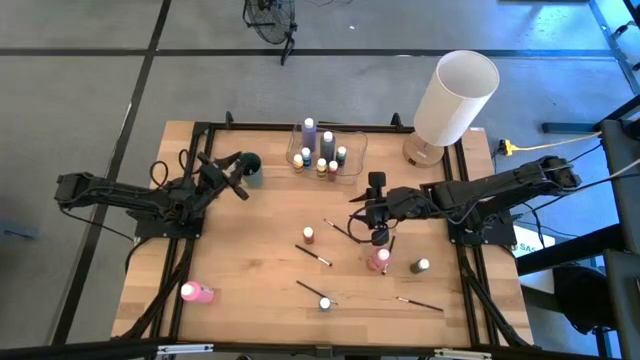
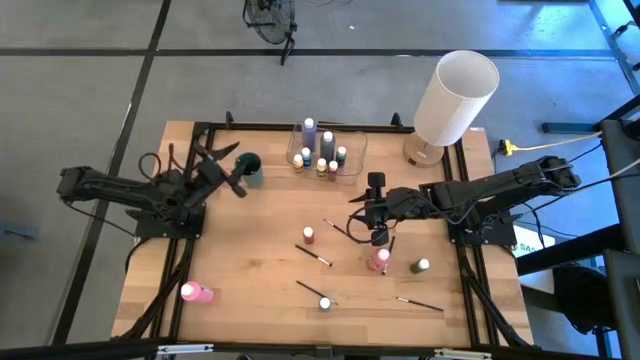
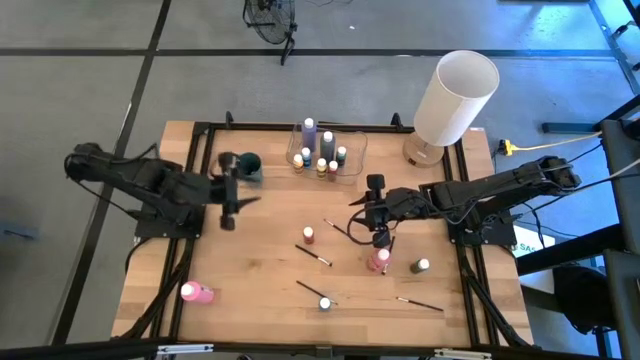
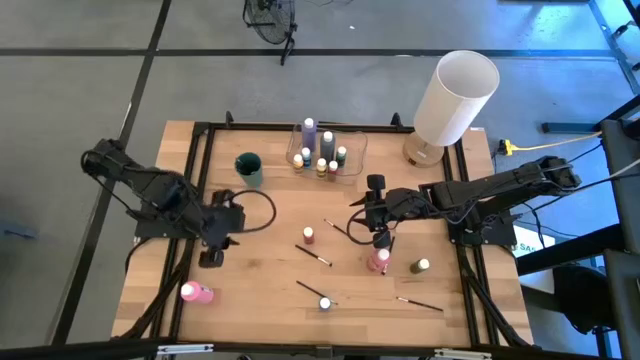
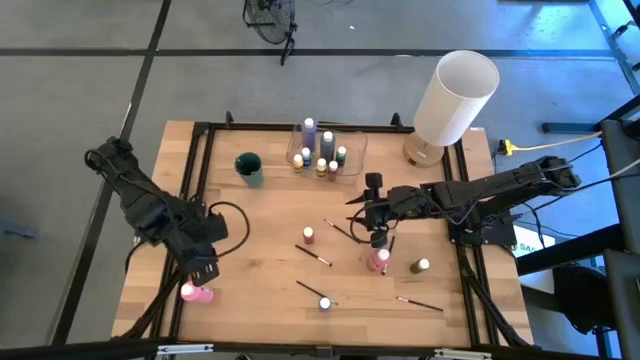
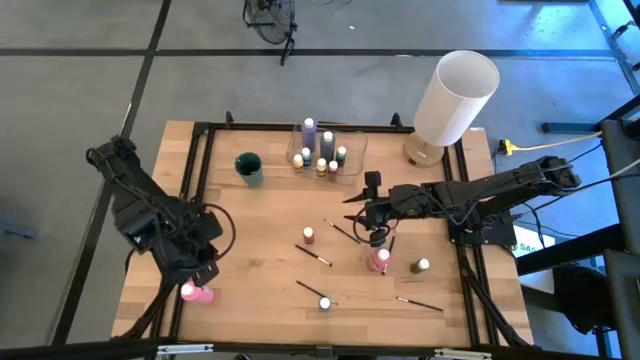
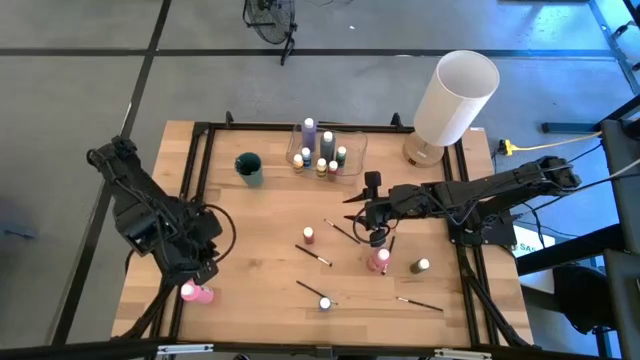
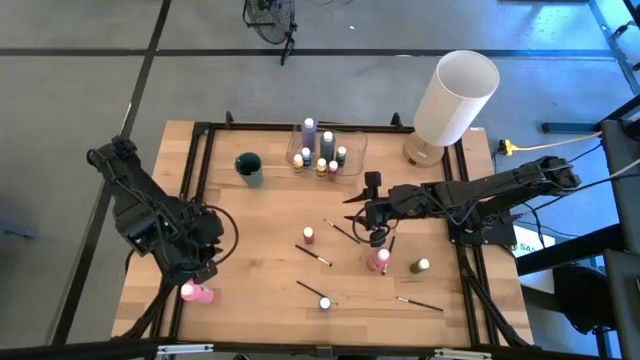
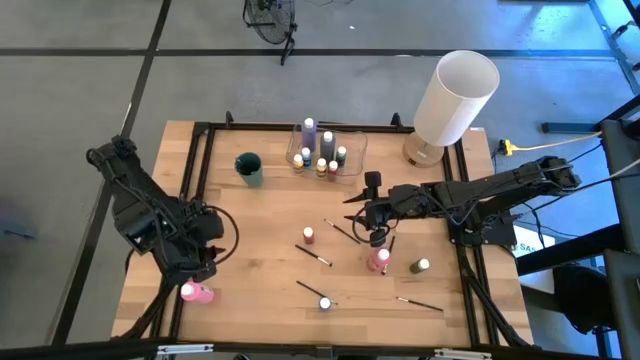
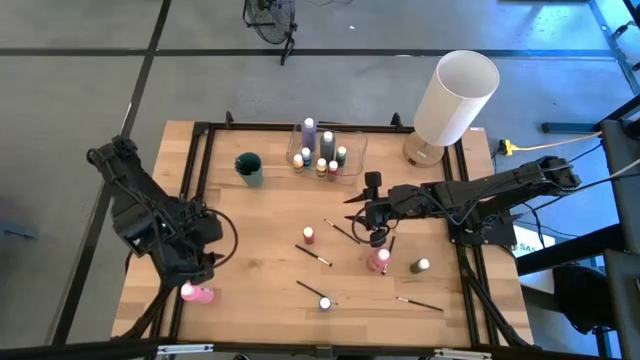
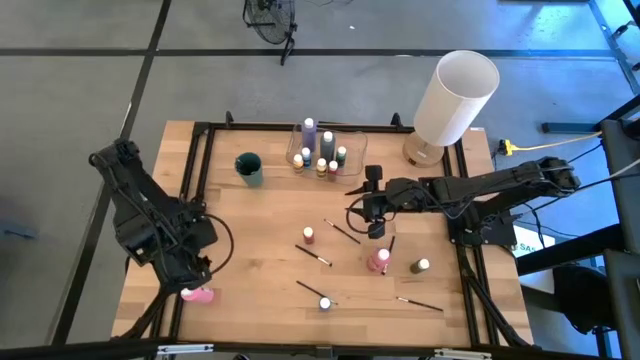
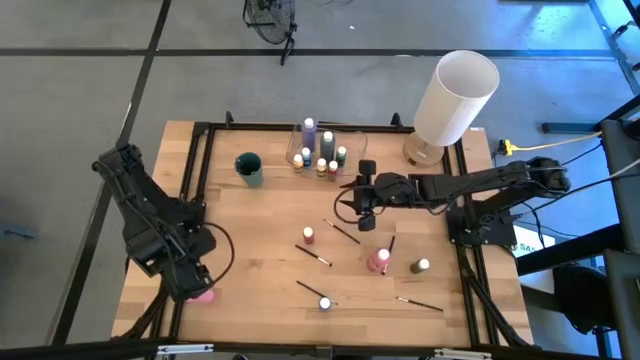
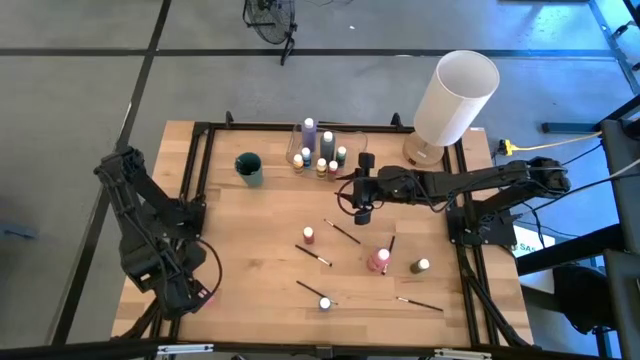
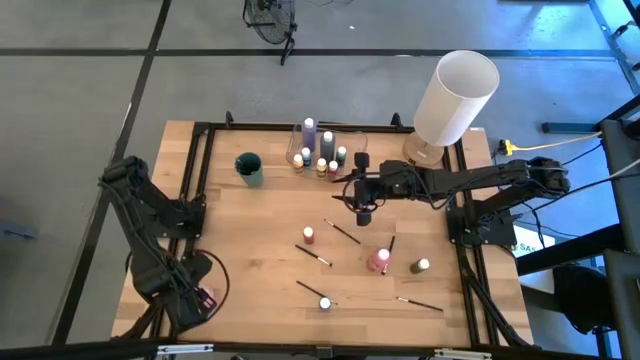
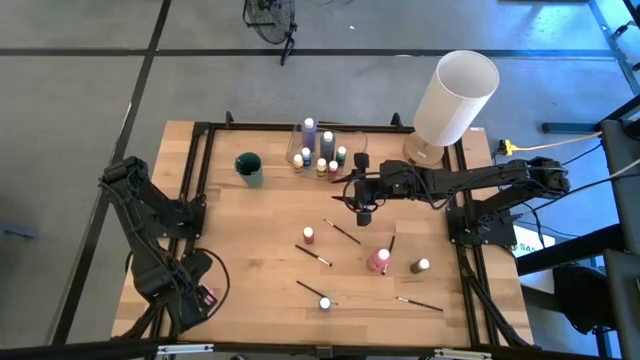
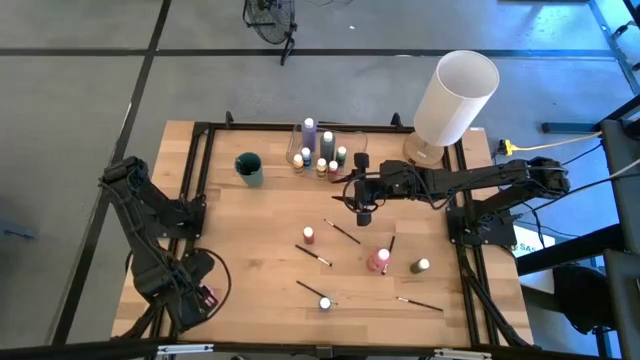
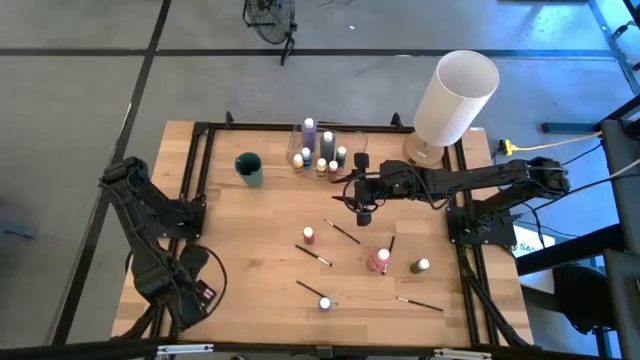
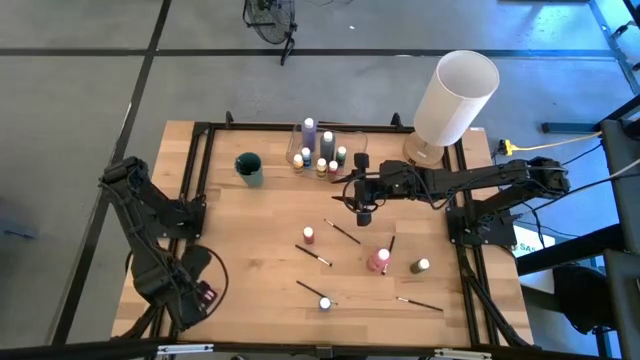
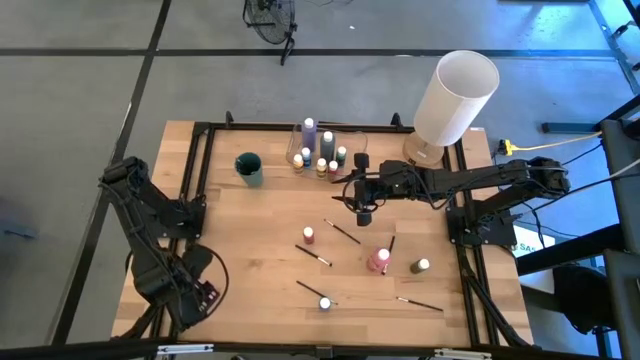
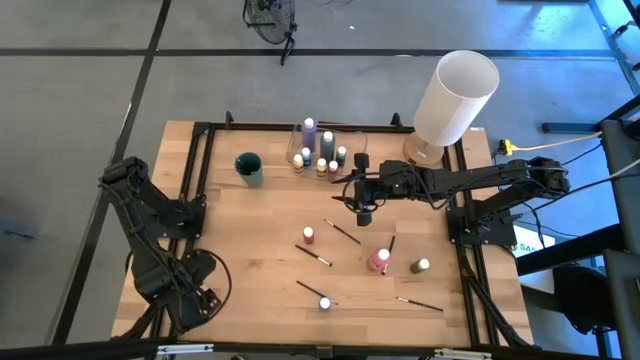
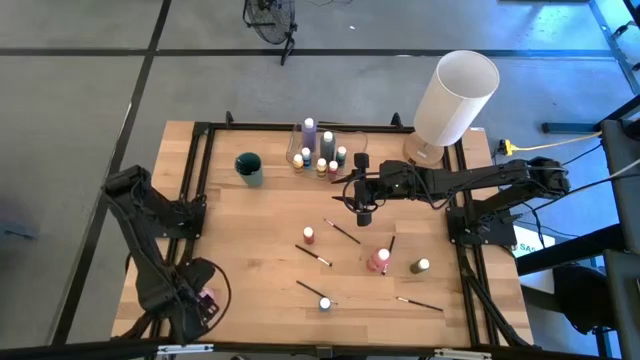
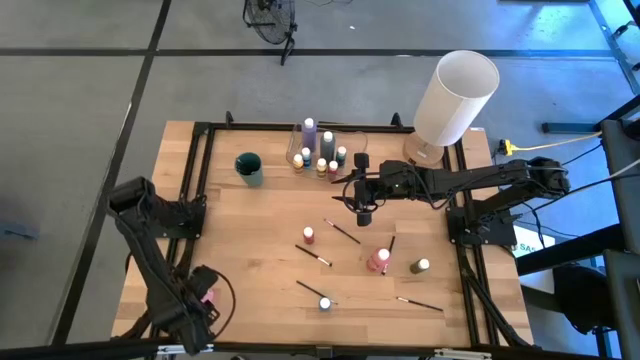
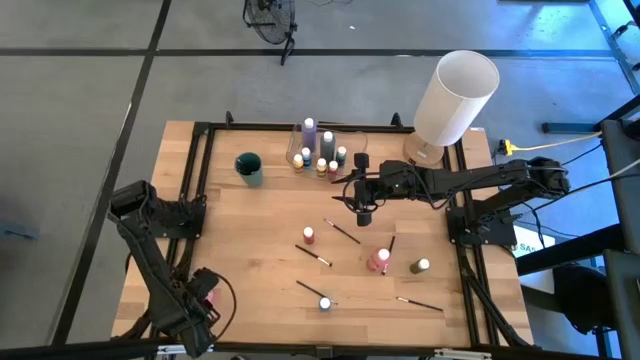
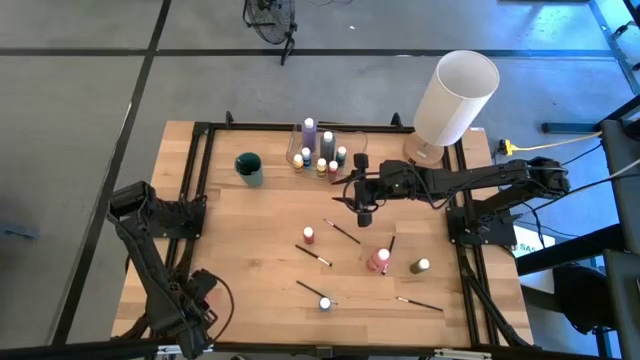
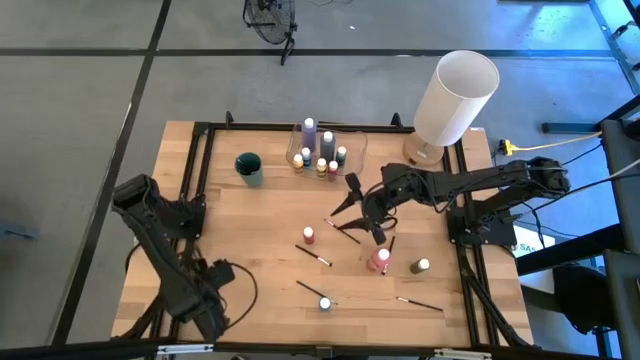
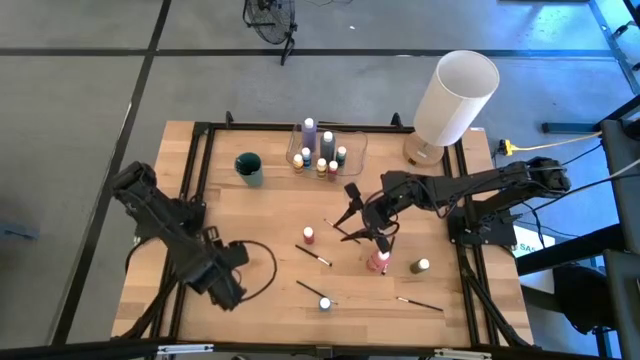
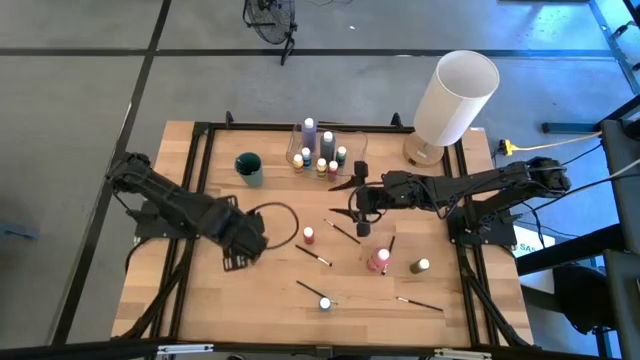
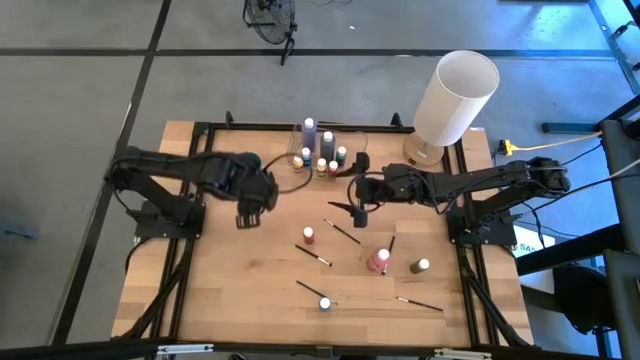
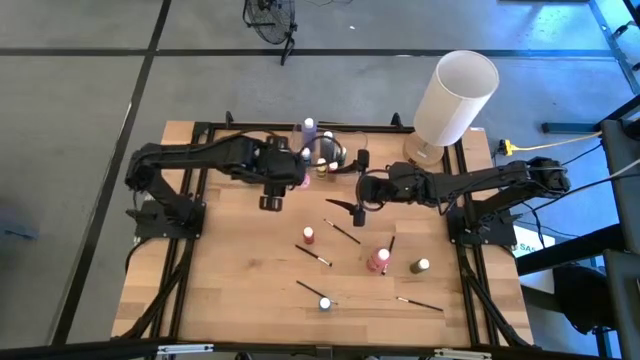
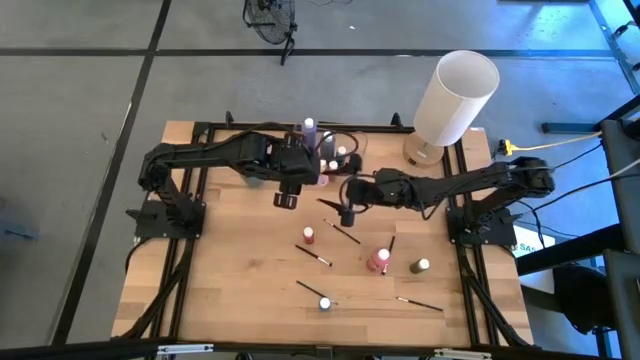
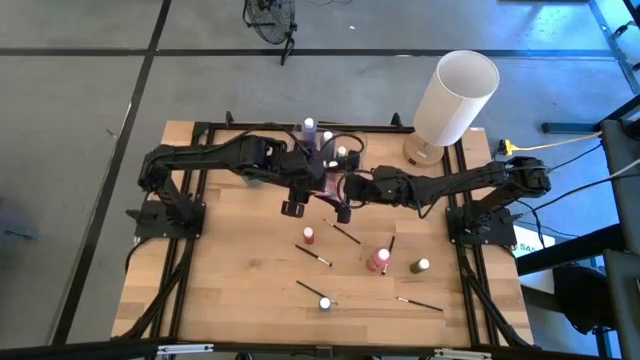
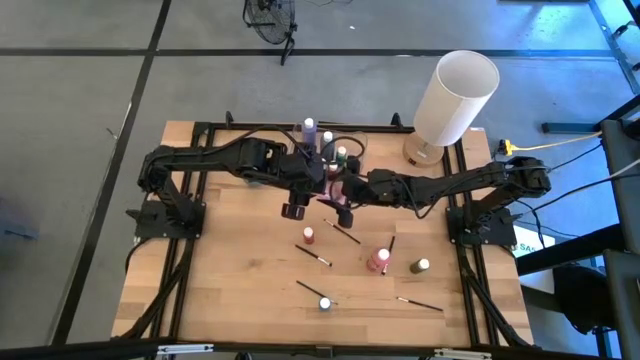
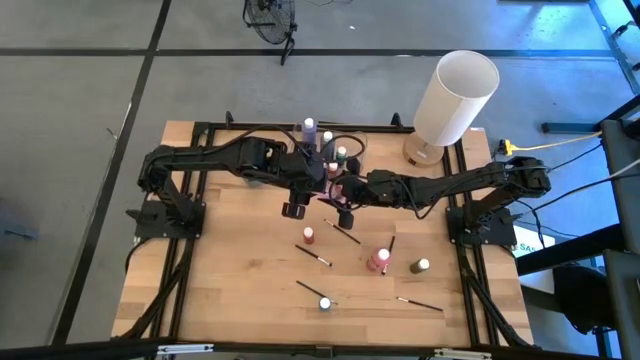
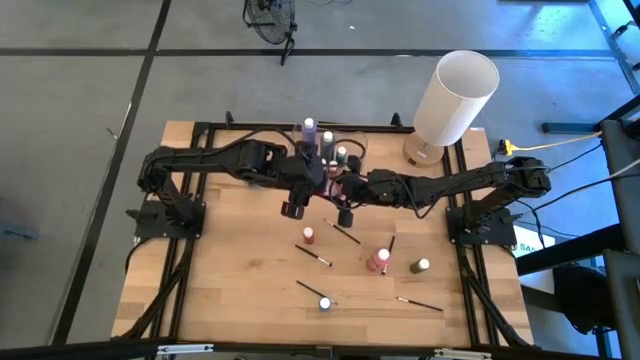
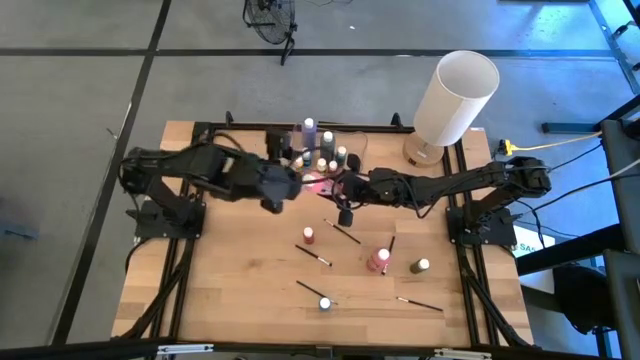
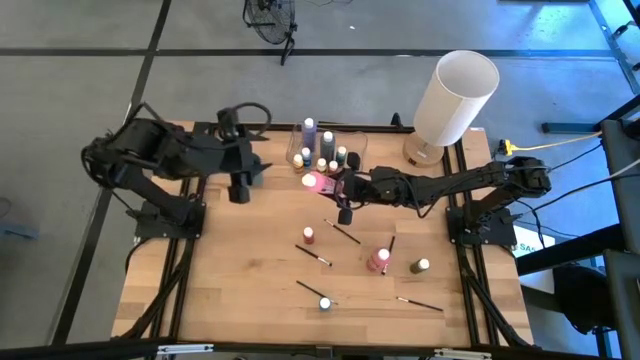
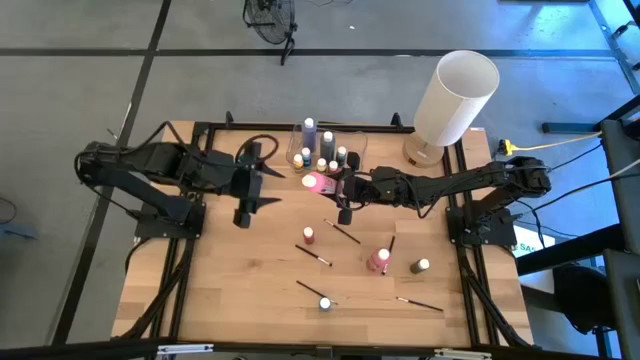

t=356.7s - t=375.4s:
Task: Pick & Place Paint Supplies
Put the pink paint bottle into the transparent bin

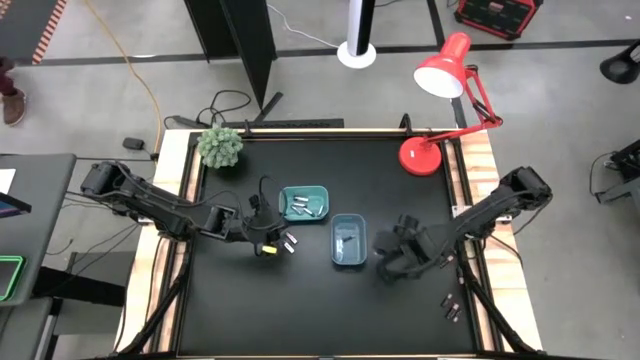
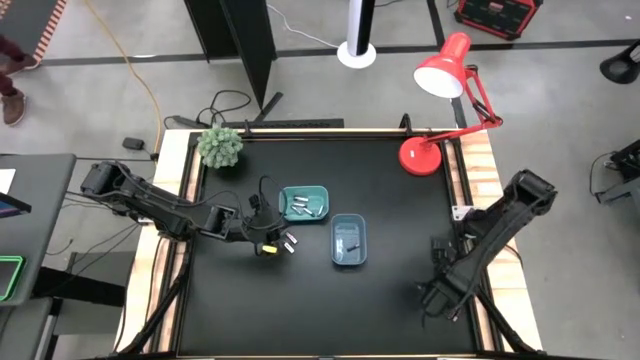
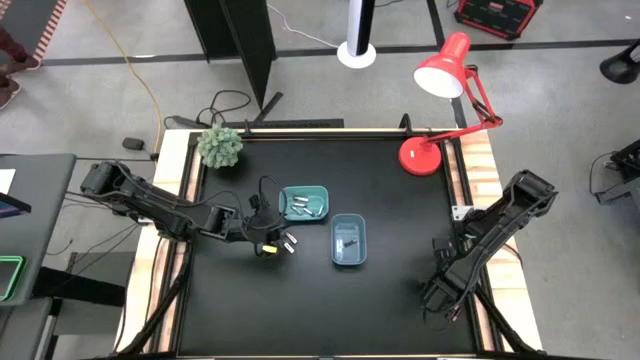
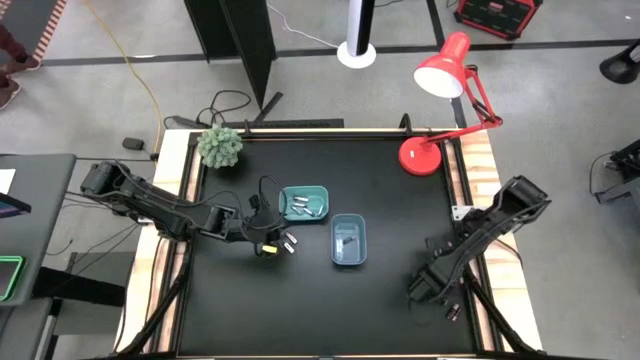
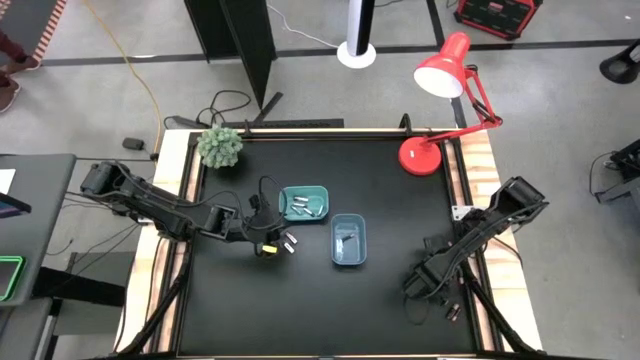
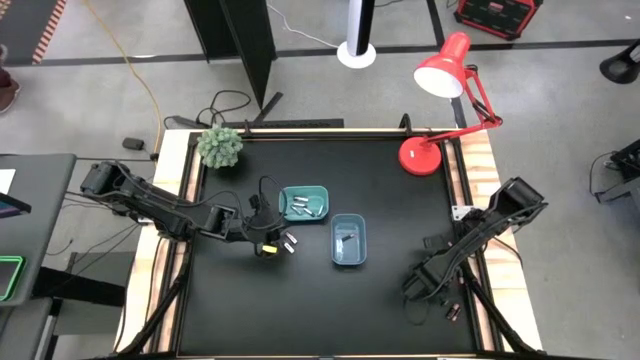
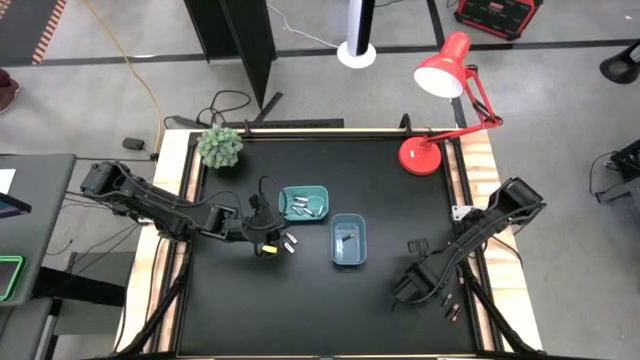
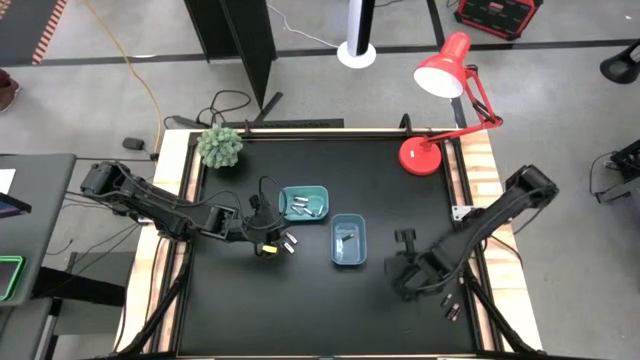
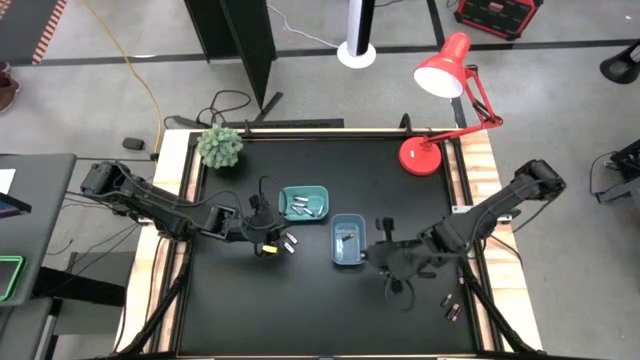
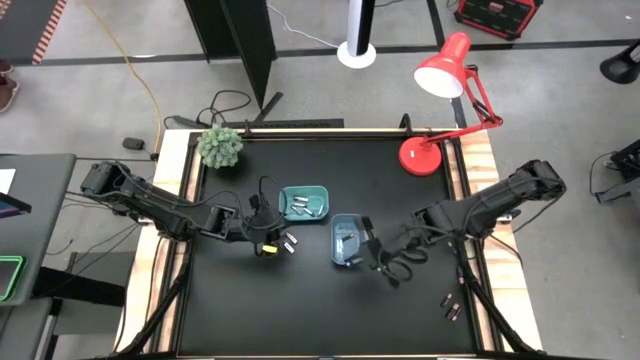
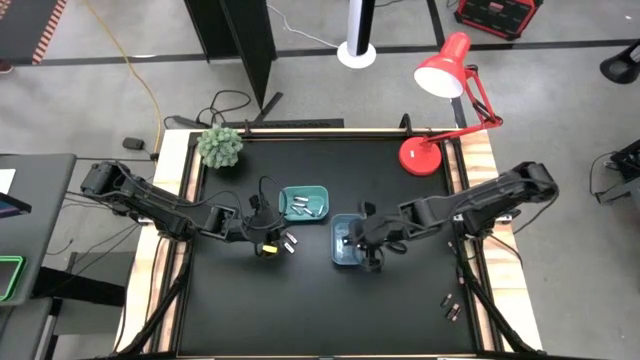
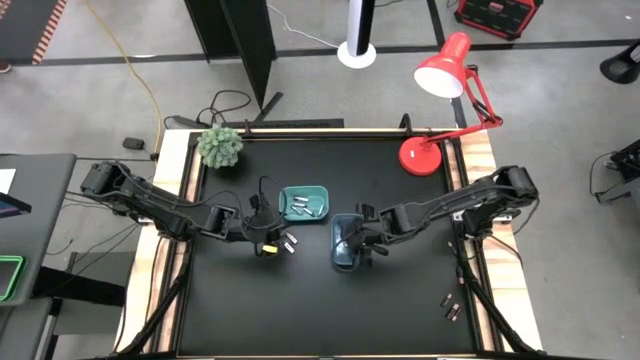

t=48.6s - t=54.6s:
Task: Sort batteries
Put the black battery into the dark blue bin
